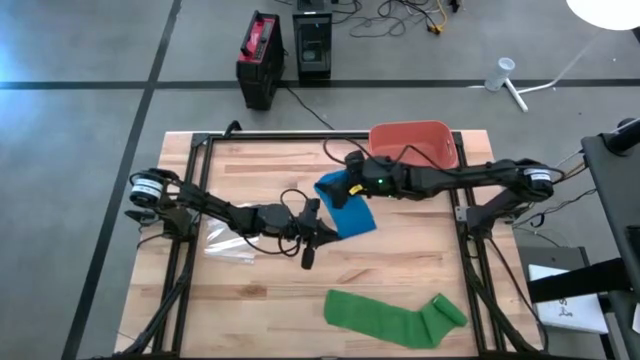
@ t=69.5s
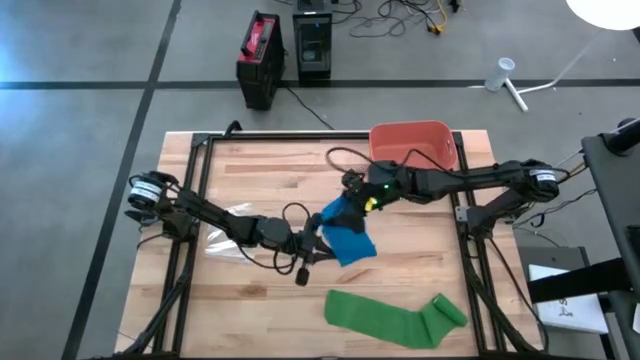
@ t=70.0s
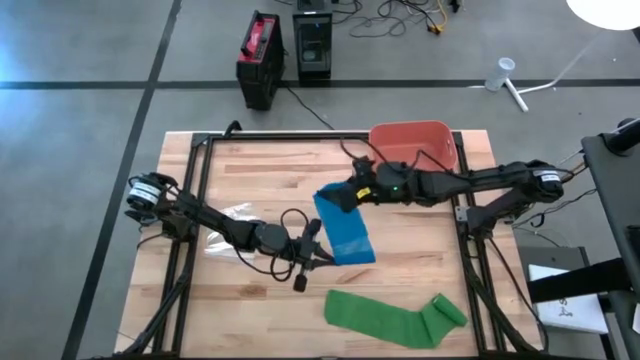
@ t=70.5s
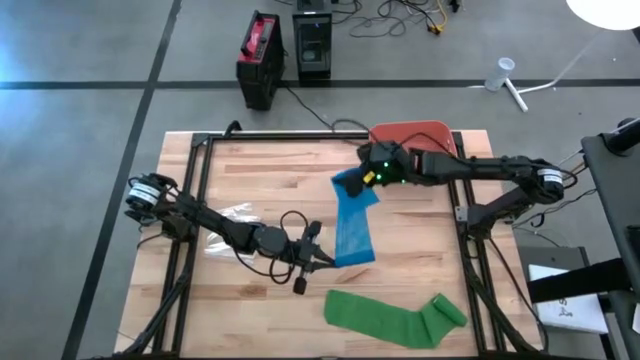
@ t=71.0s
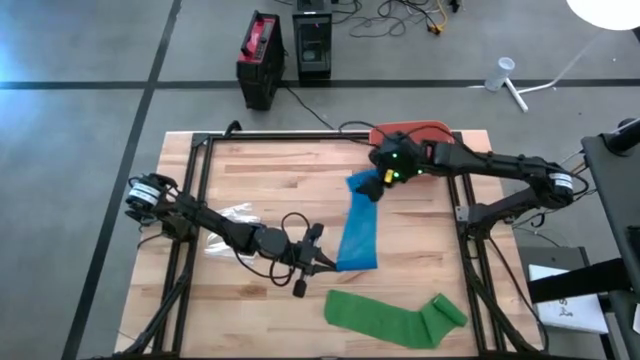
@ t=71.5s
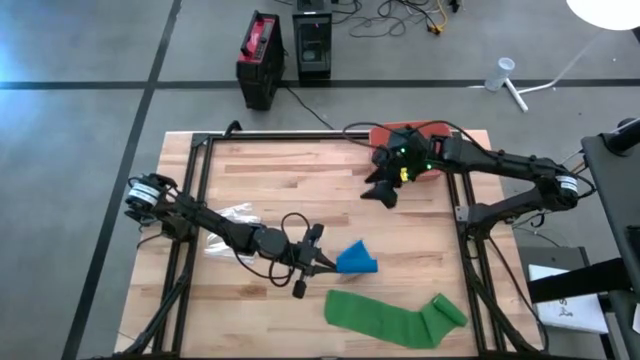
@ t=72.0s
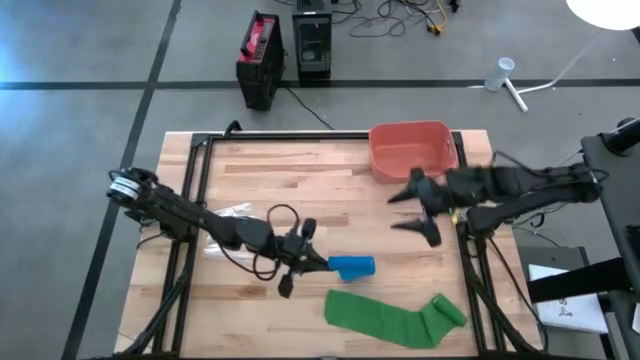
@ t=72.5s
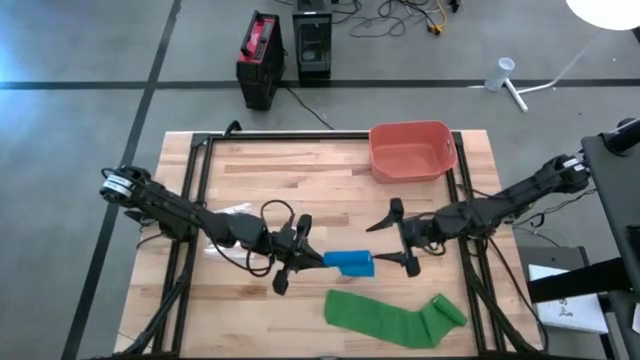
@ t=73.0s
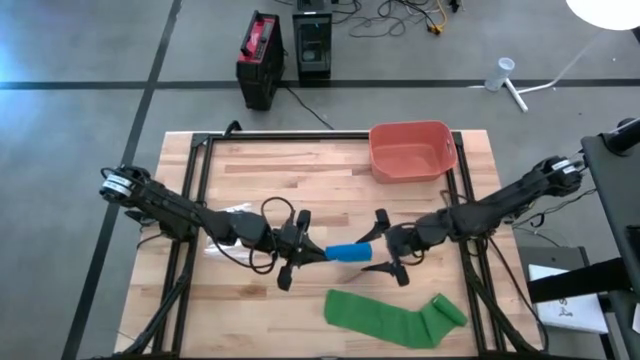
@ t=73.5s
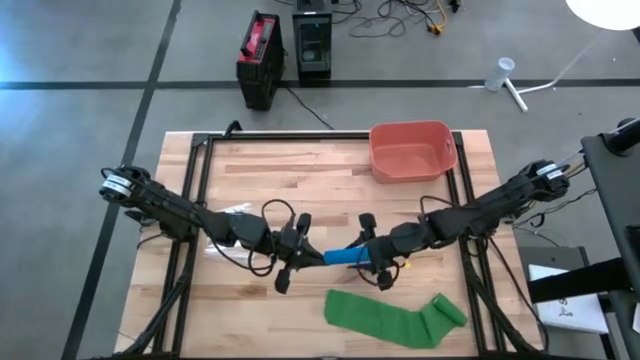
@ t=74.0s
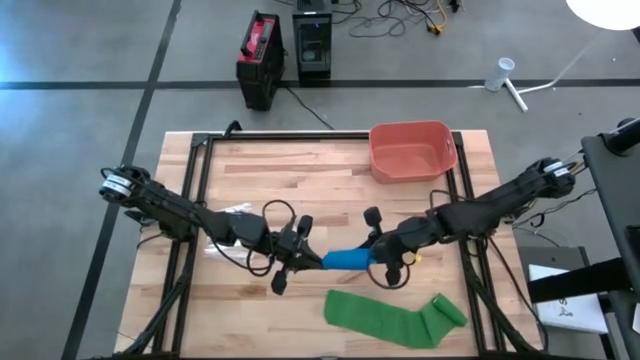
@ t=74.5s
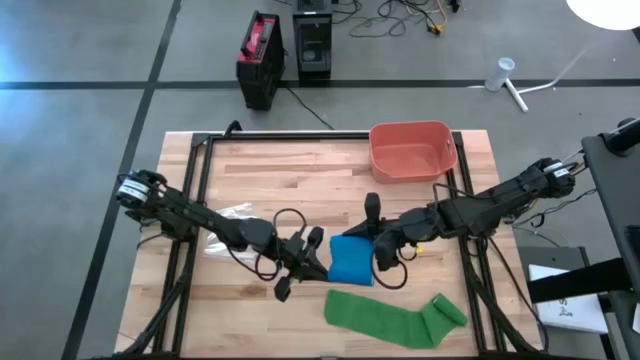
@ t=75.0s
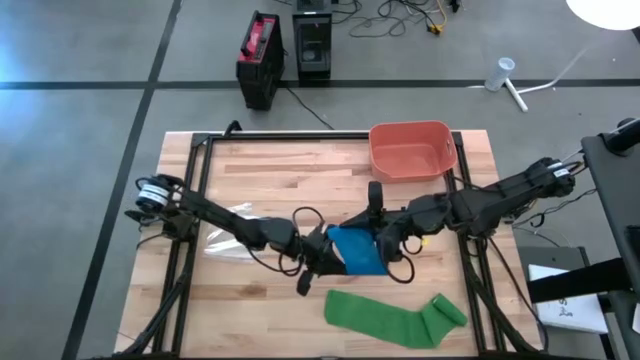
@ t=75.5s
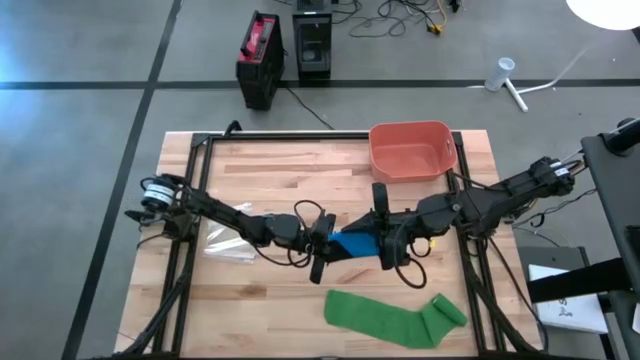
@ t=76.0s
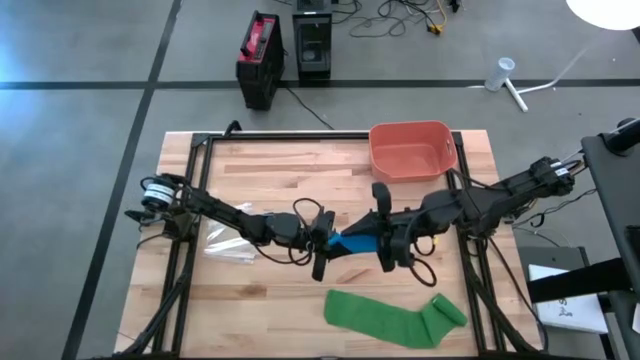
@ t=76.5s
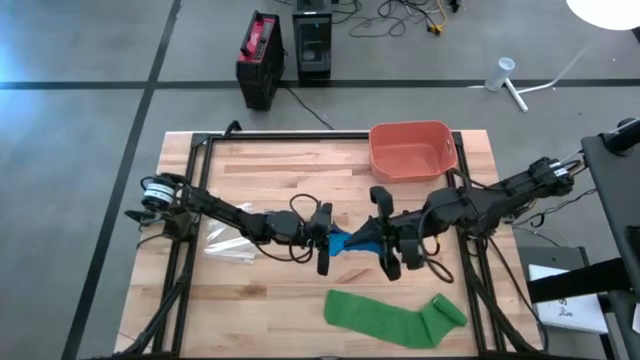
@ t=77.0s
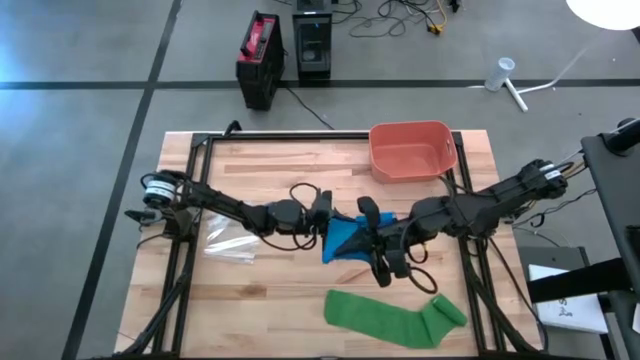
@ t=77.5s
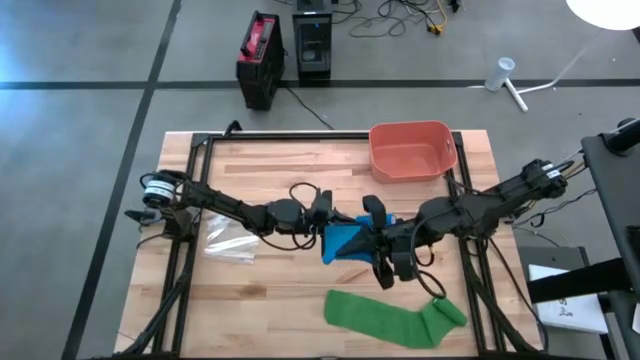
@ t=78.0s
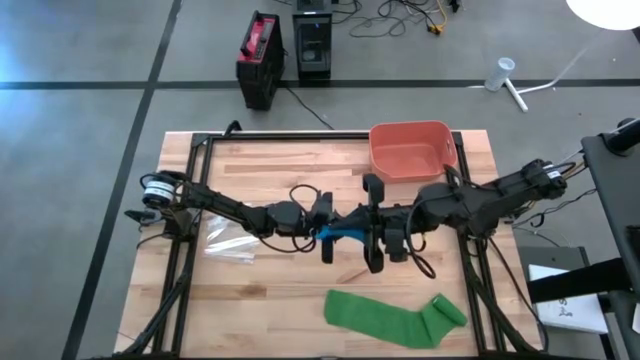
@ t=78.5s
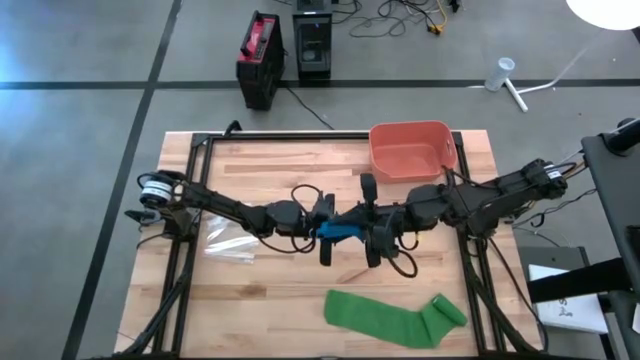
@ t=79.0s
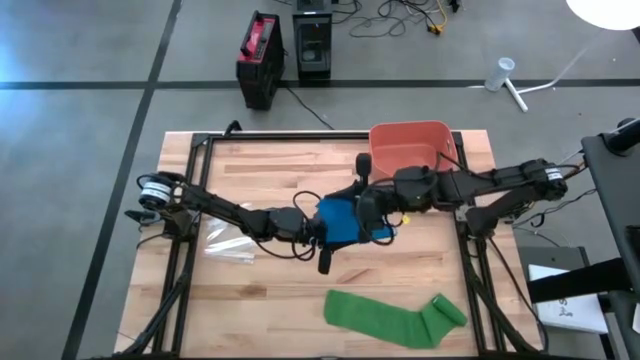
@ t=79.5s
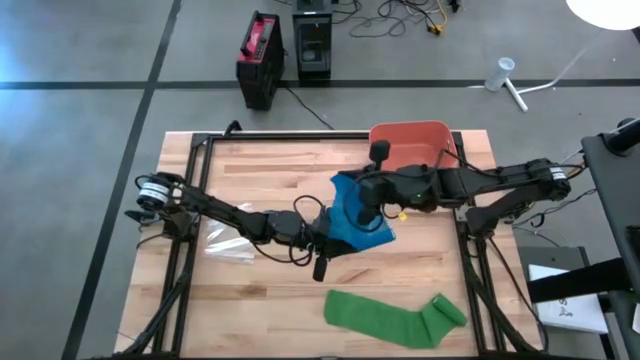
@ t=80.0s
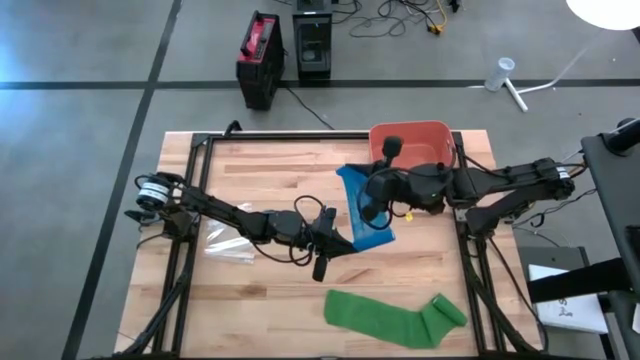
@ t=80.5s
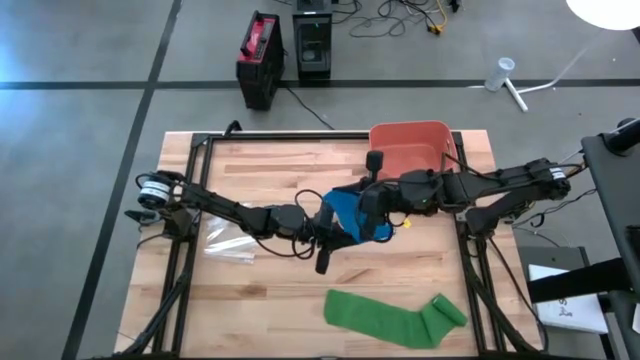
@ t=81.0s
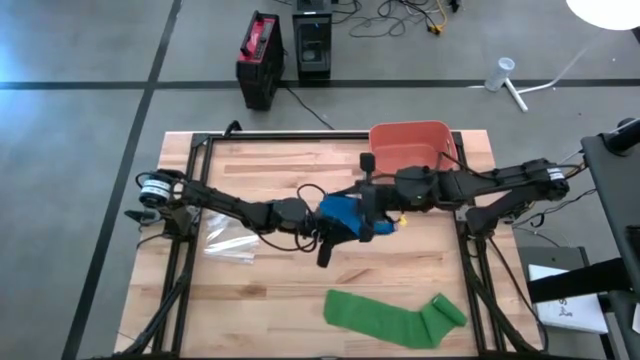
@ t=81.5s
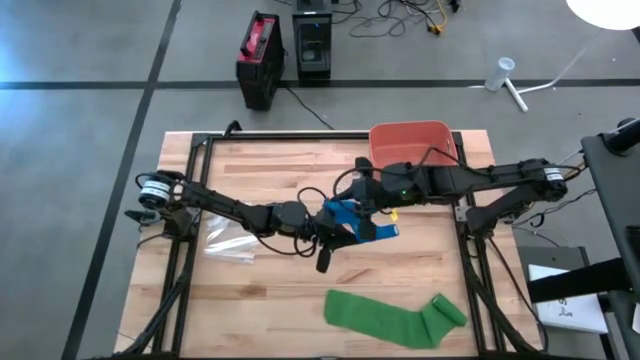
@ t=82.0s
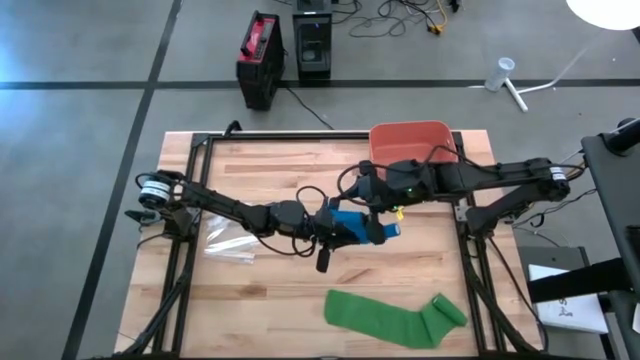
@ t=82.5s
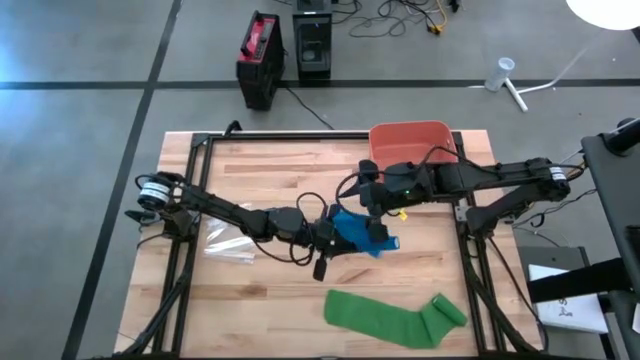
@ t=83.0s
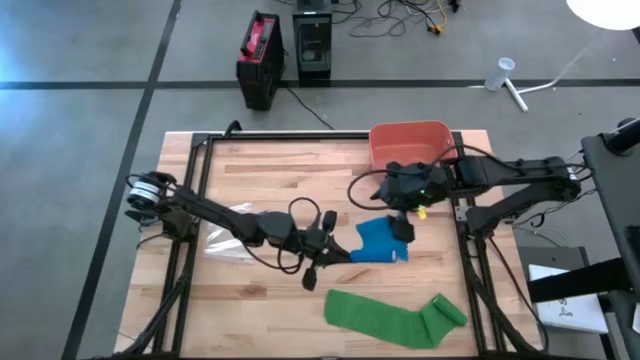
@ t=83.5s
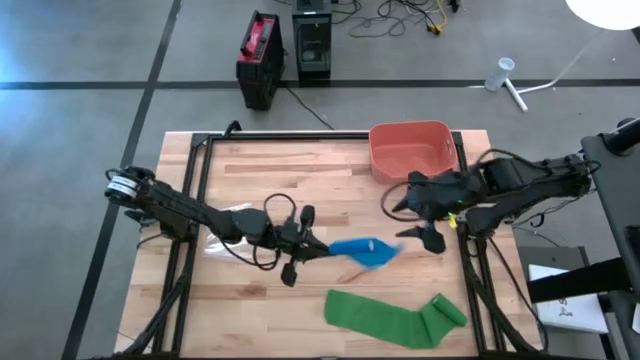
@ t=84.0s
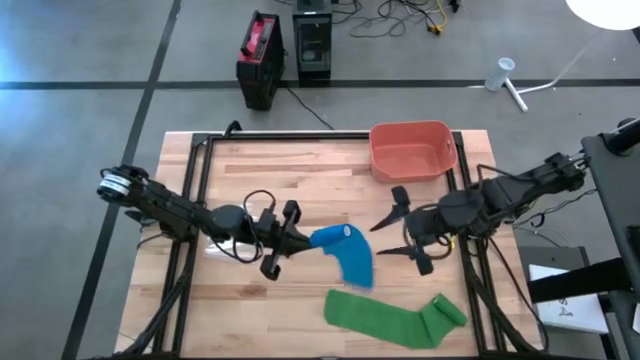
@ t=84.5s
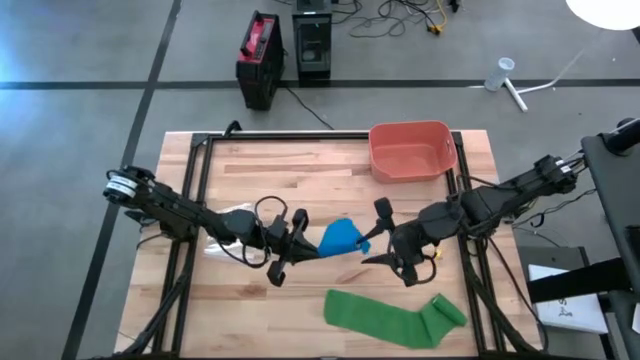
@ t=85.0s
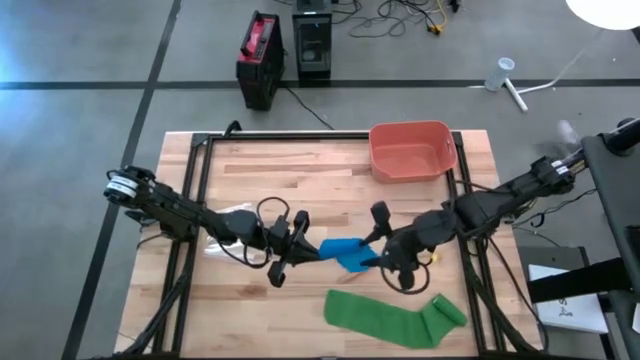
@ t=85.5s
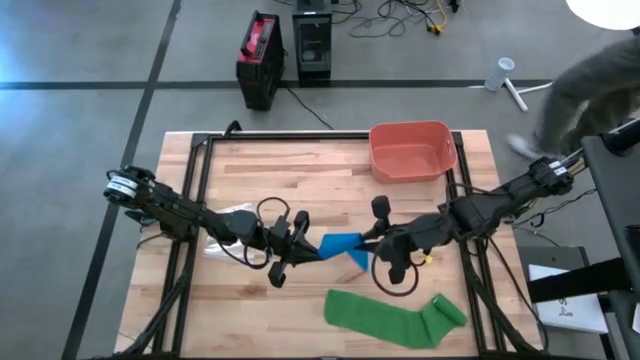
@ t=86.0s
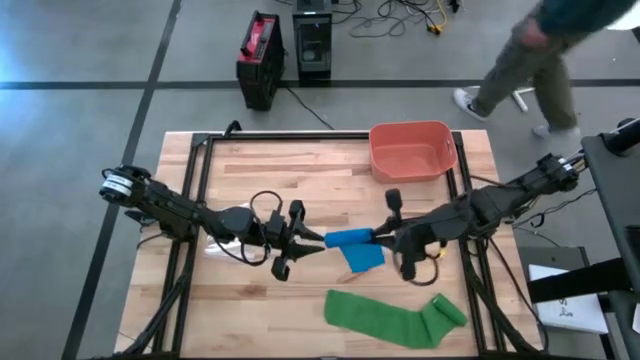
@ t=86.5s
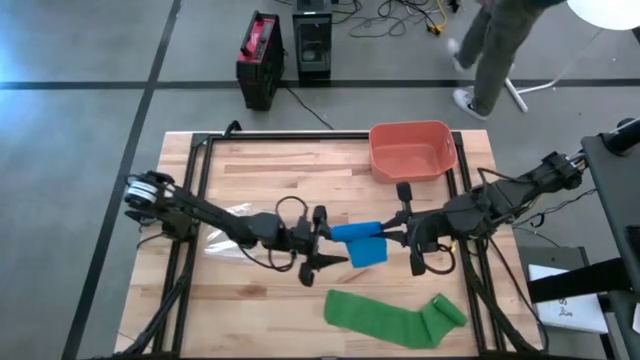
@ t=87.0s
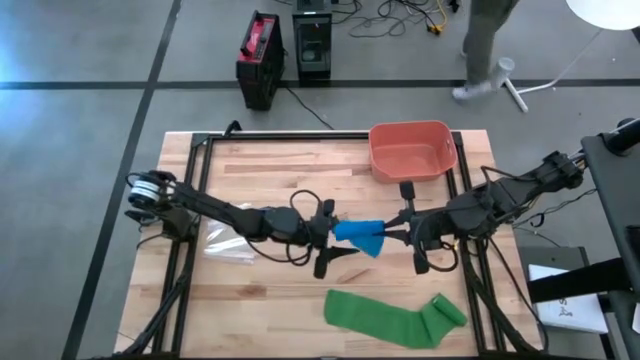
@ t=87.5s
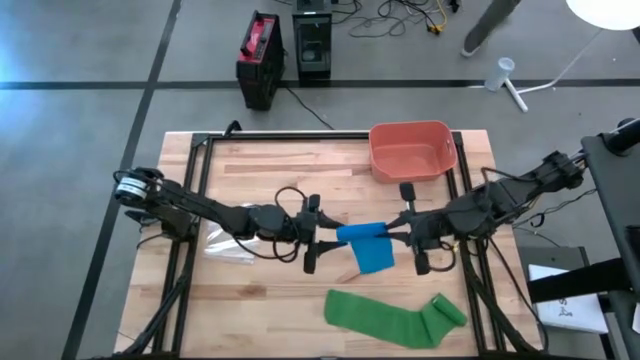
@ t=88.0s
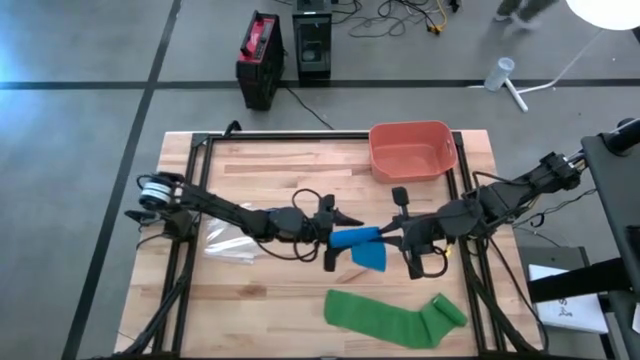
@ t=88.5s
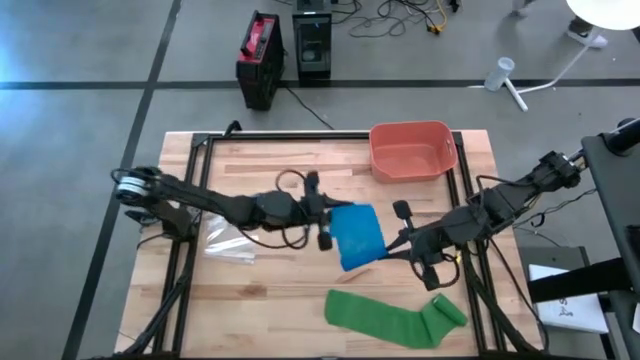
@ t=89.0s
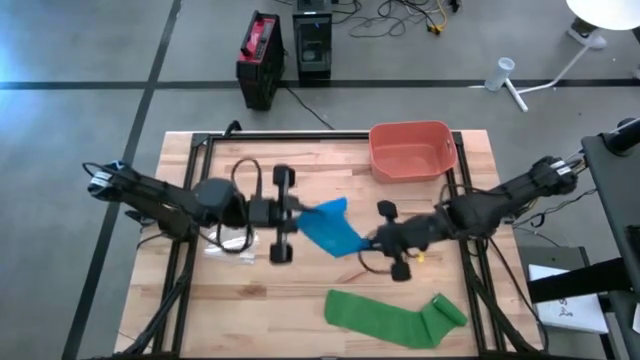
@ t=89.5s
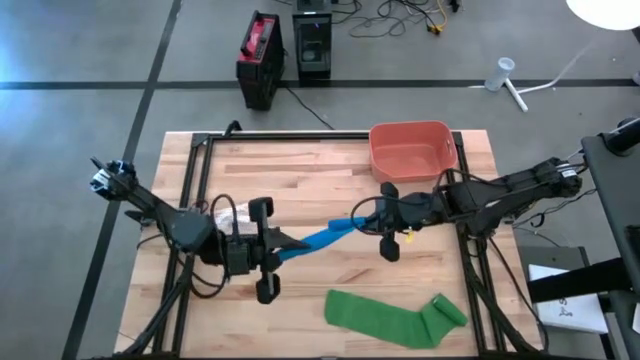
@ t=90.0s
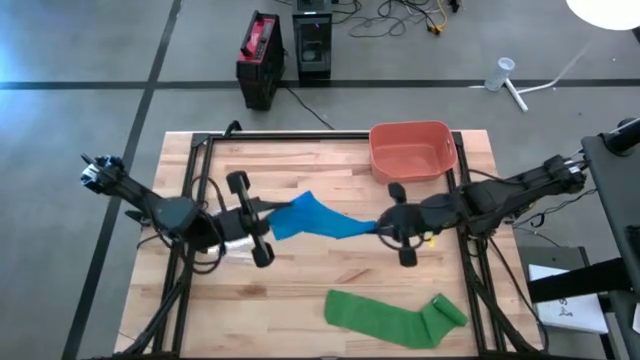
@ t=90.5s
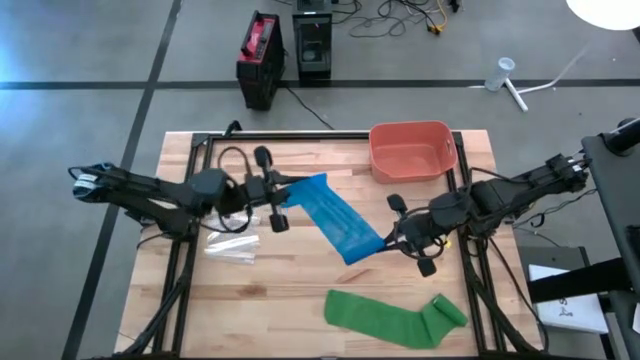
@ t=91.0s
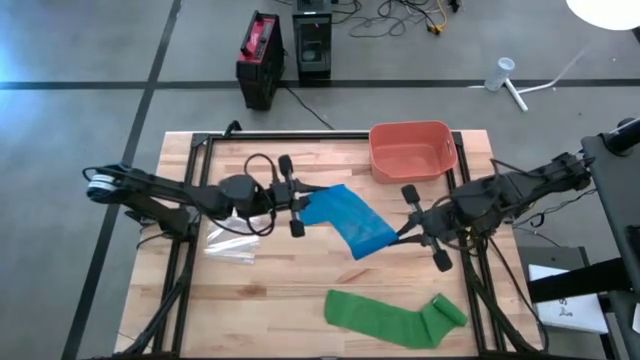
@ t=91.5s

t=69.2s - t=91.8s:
Task: Roll bandage
Roll the blue bandage
